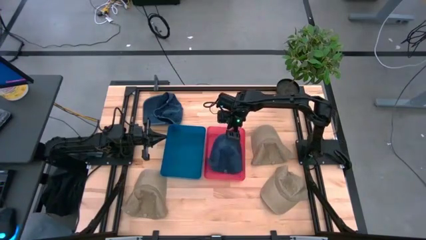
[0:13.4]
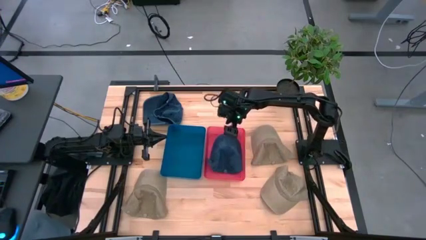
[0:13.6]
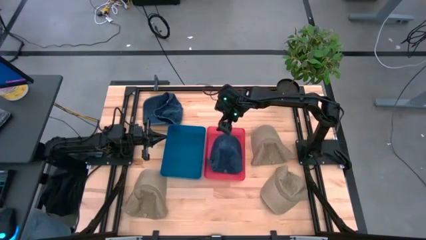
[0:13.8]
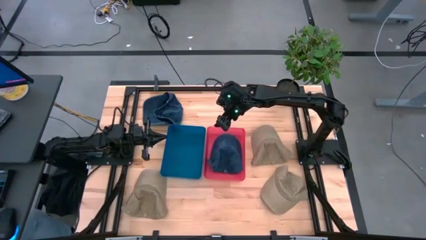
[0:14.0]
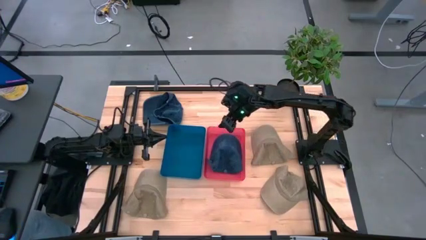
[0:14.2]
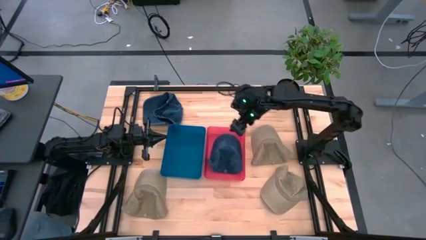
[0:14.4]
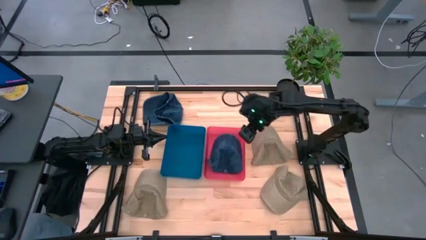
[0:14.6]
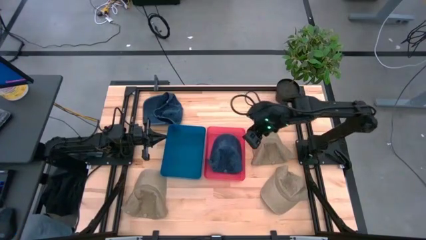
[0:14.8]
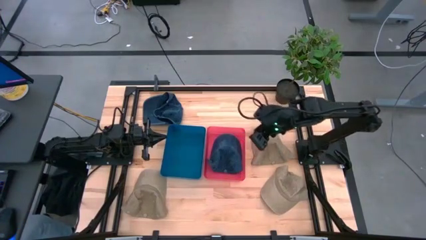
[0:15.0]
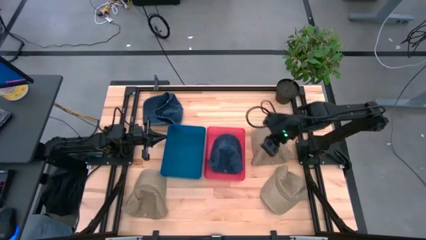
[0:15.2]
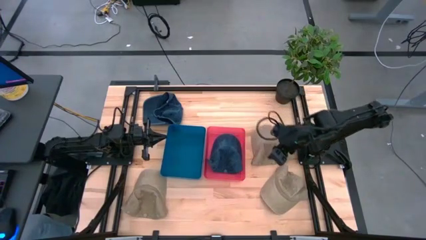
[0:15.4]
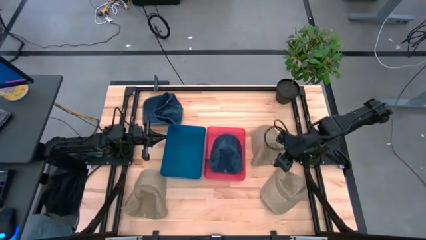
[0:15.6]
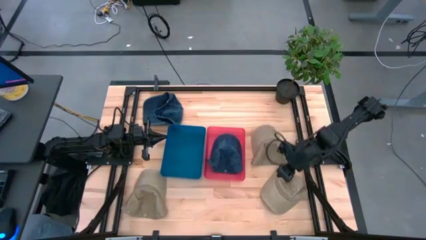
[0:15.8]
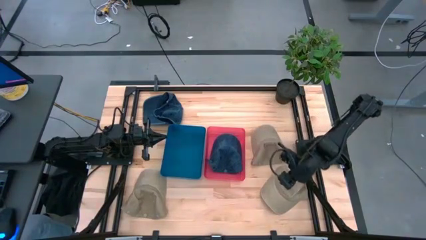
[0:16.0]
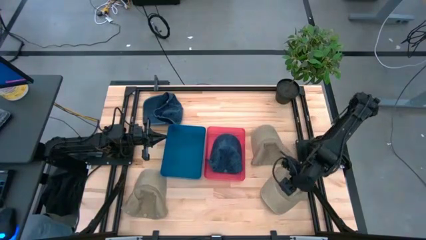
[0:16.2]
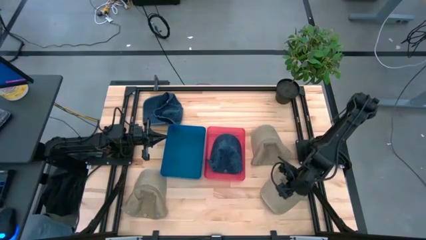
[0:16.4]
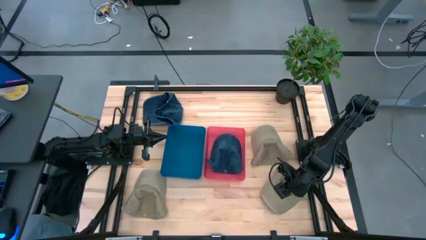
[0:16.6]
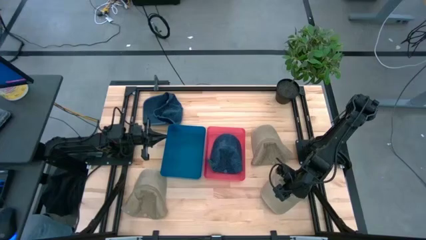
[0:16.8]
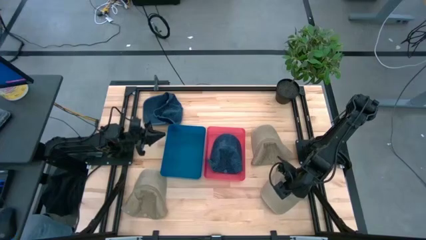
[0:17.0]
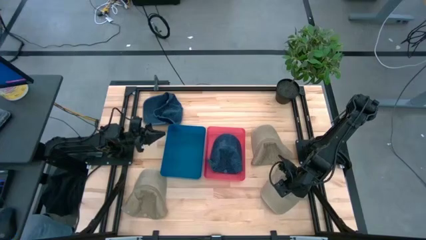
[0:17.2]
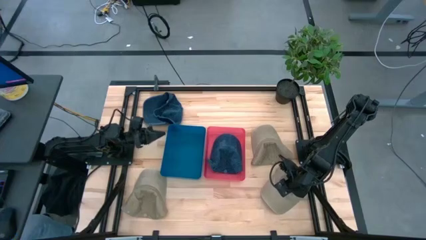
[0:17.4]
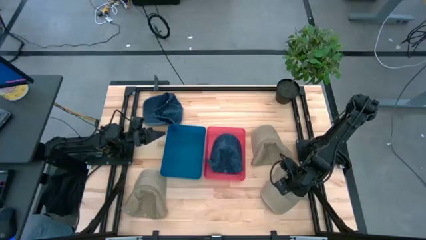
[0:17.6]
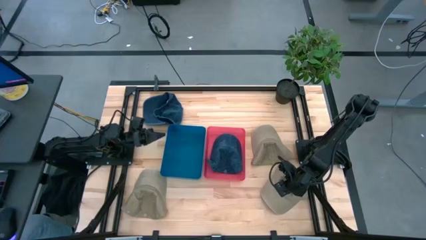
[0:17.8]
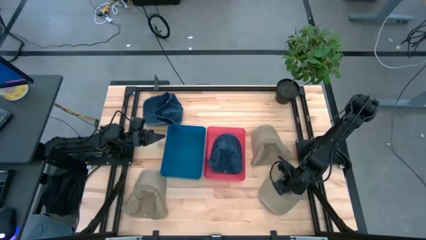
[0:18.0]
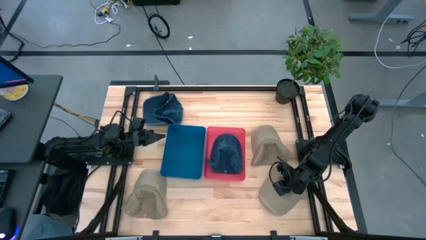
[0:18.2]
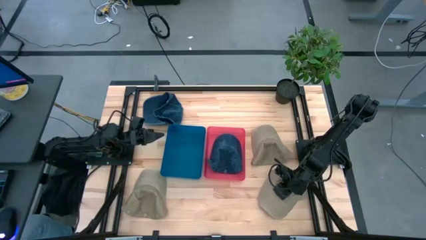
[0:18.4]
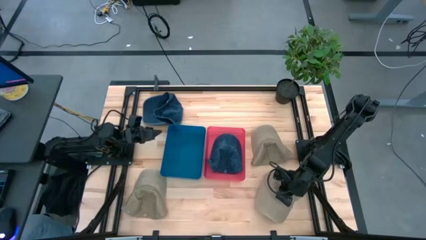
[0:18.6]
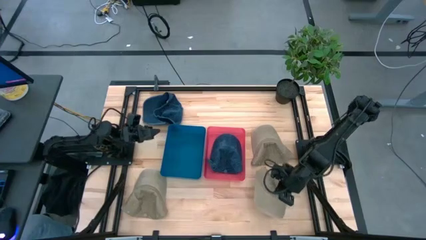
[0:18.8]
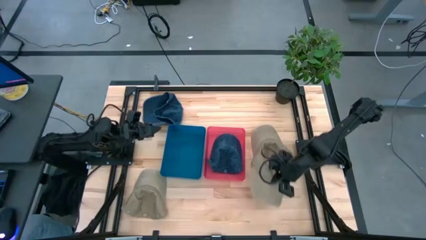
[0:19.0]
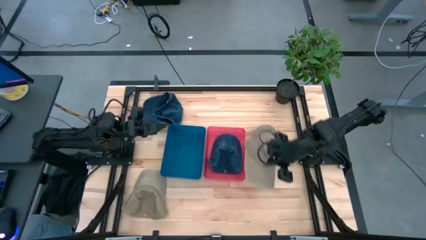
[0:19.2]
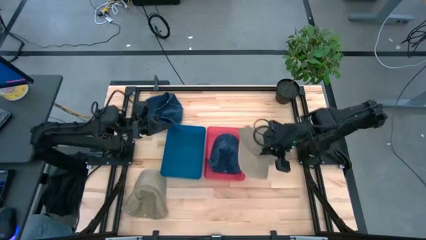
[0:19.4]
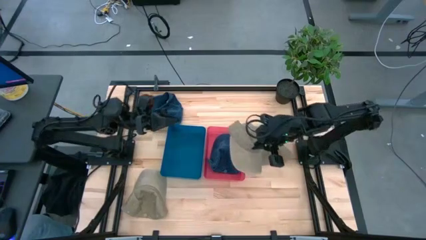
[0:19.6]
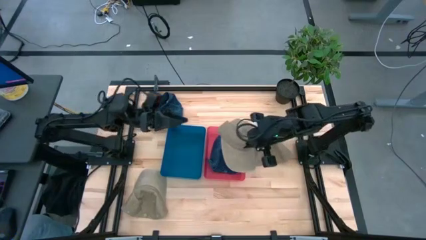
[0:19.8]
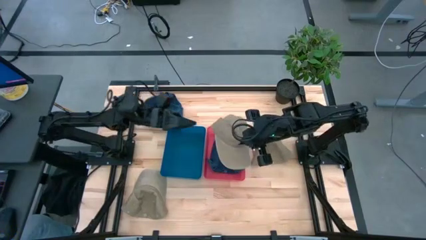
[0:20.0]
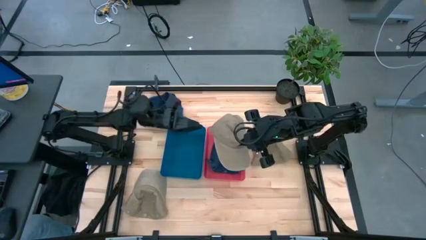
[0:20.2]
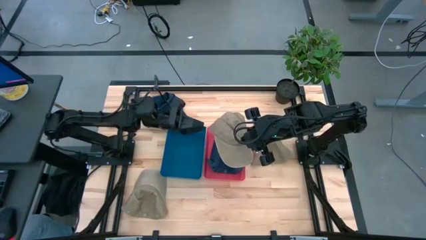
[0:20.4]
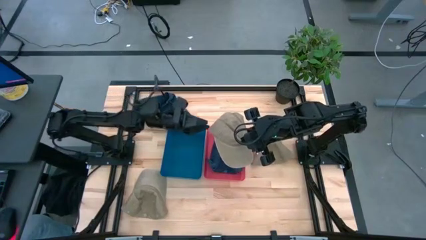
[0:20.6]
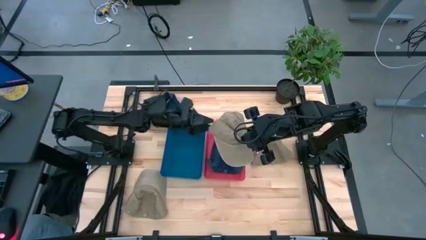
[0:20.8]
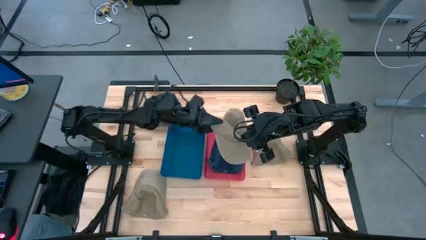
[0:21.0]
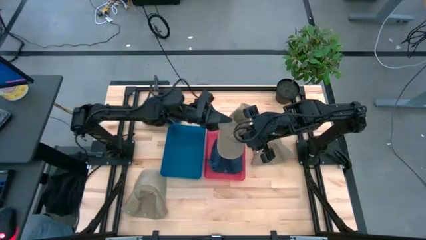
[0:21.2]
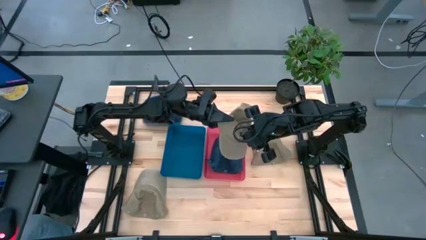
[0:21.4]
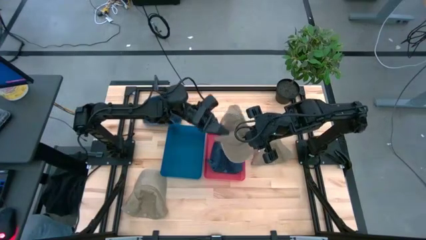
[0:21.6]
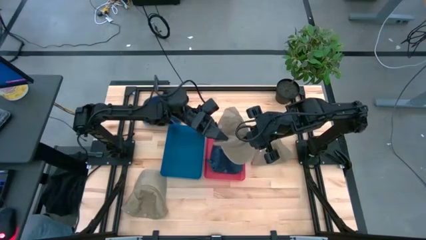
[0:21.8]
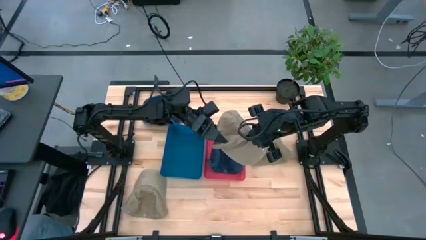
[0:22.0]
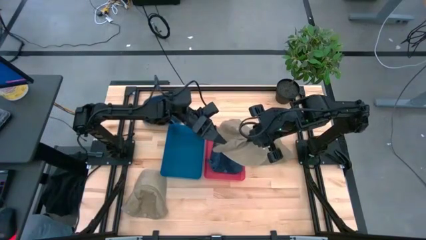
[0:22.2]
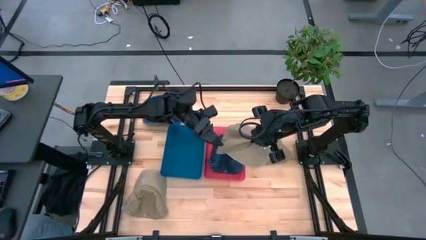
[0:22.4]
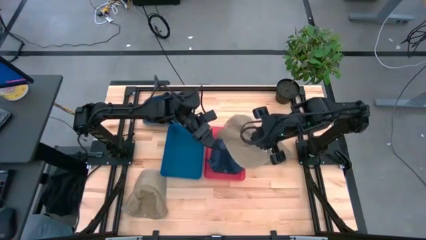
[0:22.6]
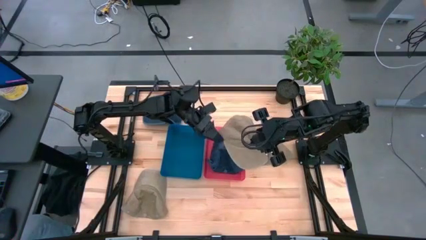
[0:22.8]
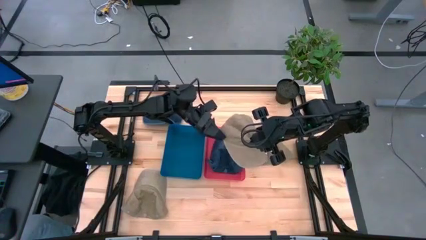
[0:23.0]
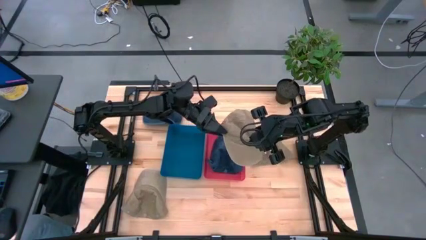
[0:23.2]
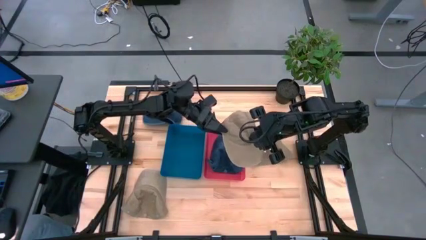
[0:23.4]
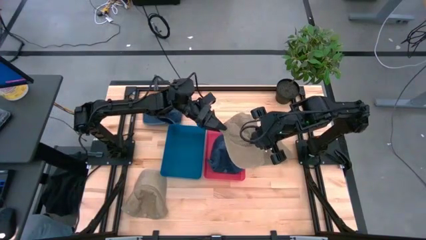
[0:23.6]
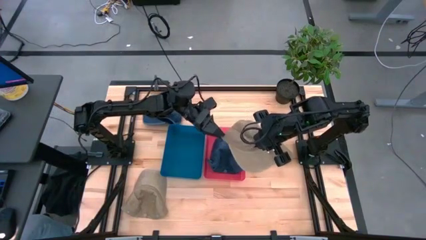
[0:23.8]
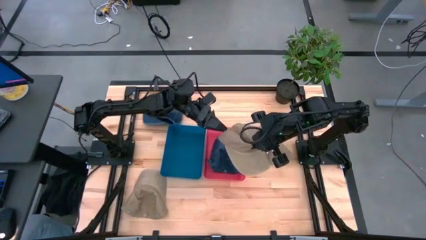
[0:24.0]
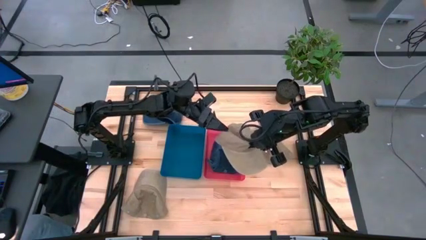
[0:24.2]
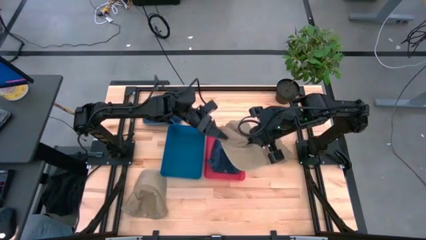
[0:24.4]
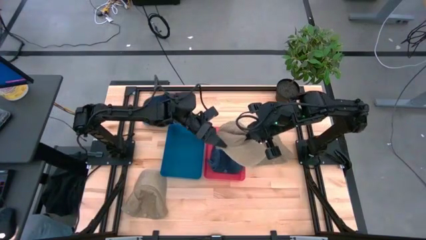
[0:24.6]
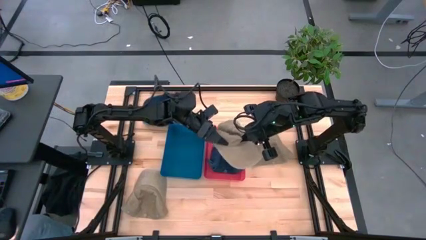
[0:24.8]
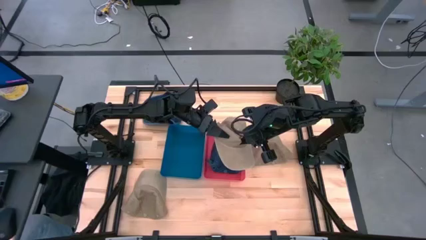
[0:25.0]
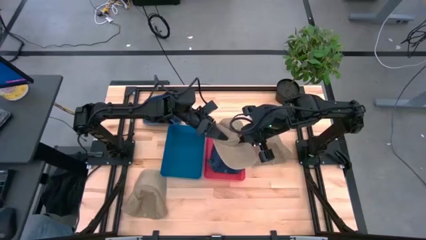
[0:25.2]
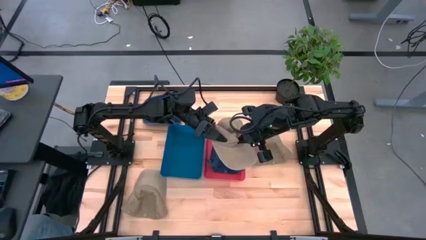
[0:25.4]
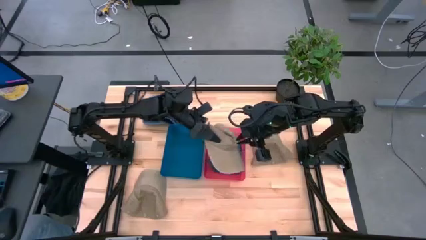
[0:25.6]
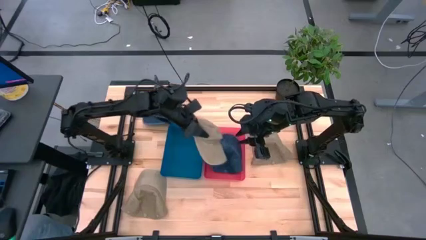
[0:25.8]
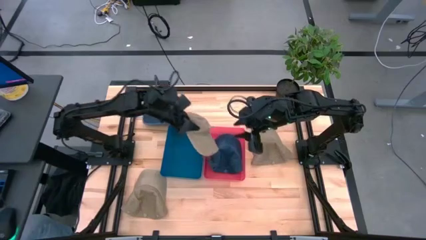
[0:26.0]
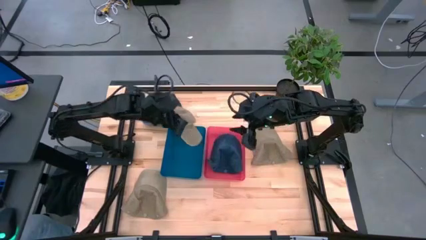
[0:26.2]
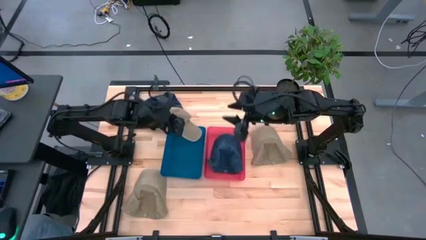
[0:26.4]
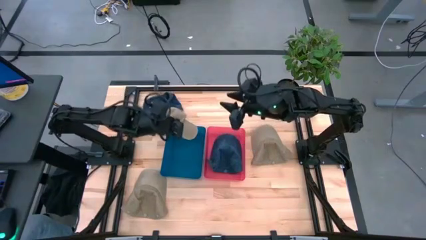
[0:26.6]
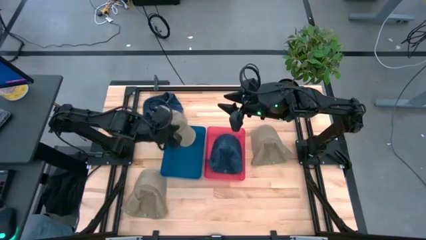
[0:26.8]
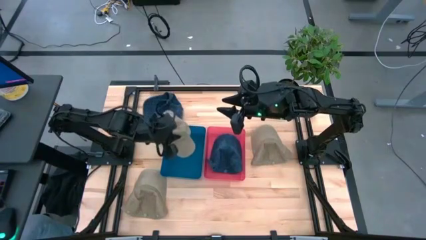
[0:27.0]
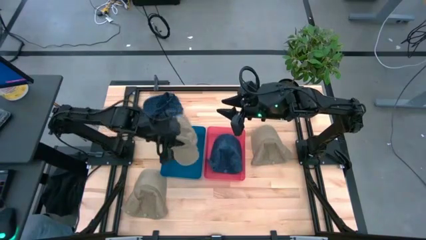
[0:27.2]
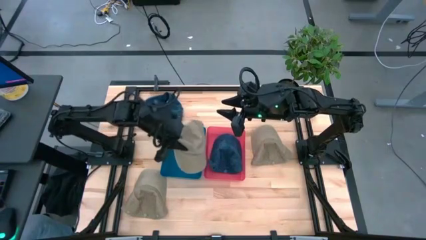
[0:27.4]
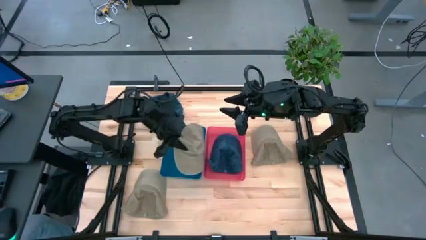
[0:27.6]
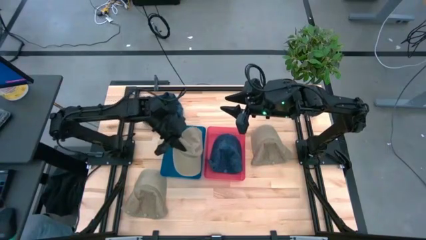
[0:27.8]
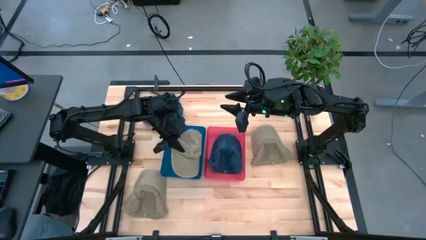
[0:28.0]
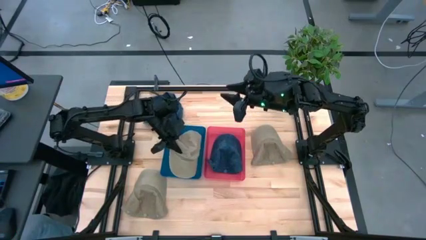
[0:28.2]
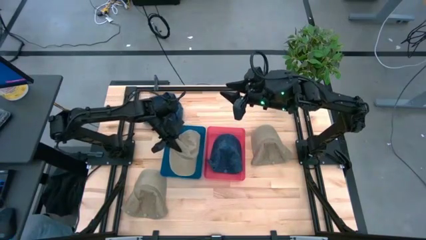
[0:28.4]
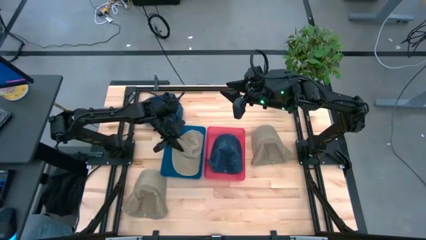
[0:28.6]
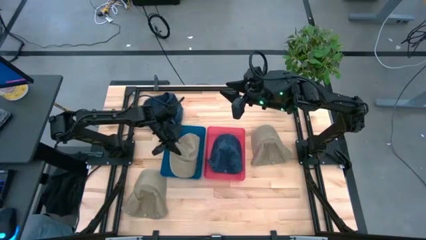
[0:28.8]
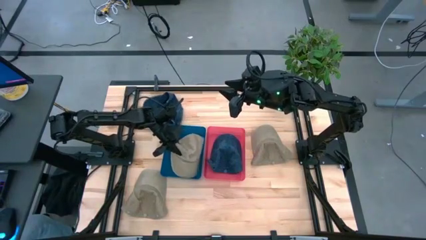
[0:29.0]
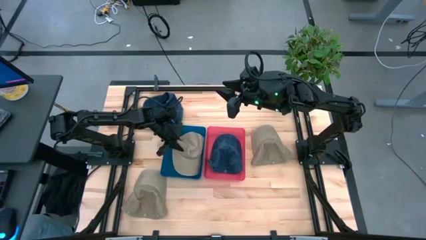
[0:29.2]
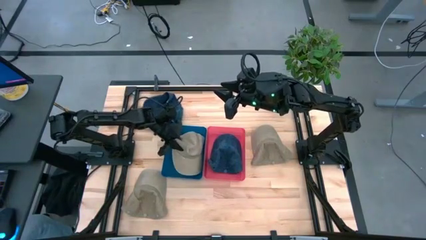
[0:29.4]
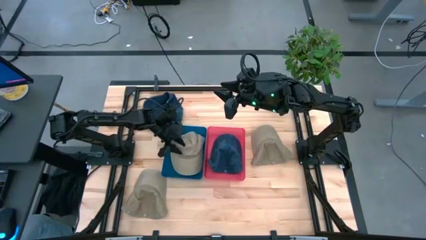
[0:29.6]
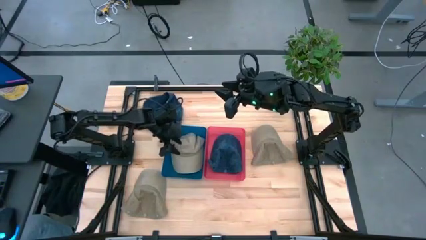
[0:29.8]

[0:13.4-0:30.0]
Task: Pick & Place hat
Put the bottom right brown cap into the blue bin
